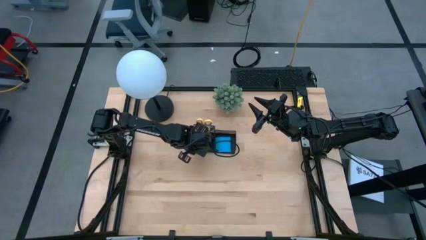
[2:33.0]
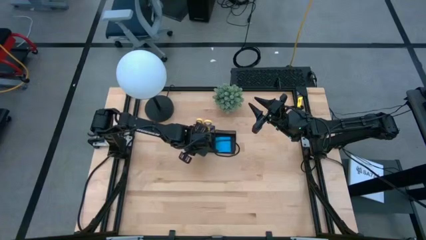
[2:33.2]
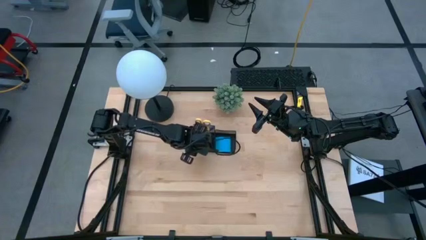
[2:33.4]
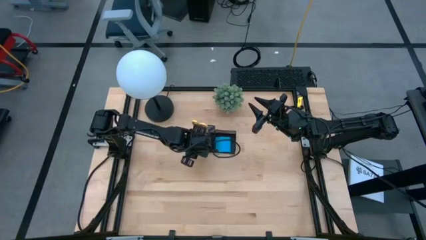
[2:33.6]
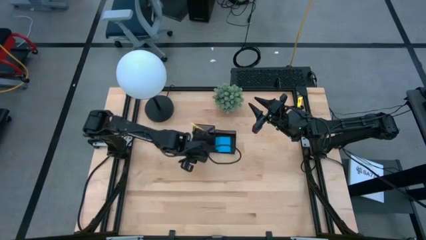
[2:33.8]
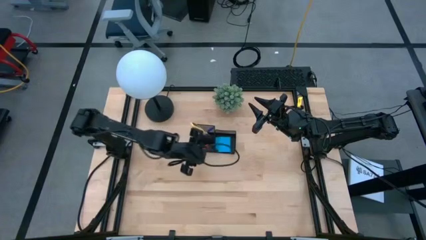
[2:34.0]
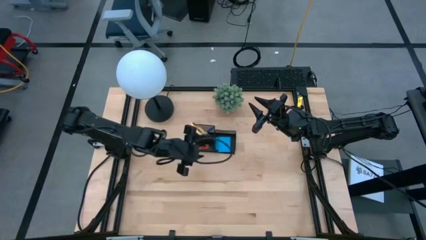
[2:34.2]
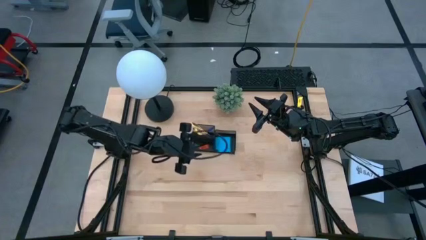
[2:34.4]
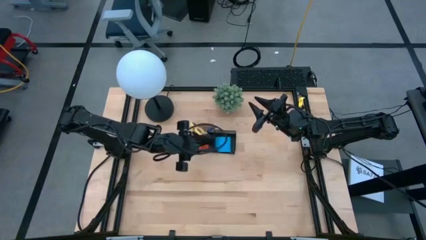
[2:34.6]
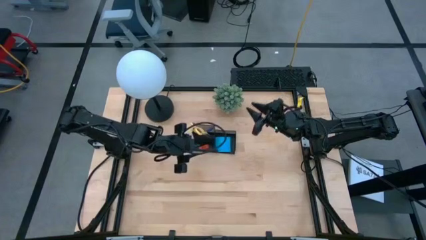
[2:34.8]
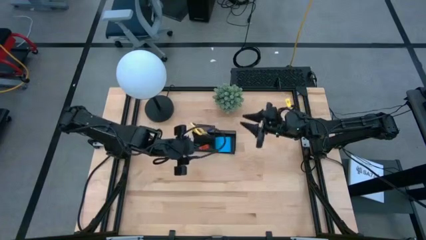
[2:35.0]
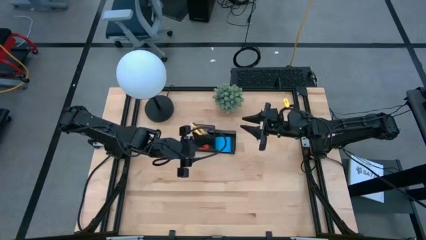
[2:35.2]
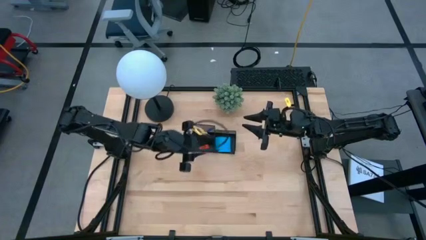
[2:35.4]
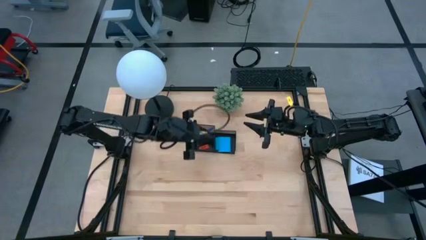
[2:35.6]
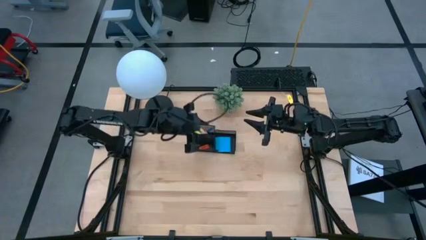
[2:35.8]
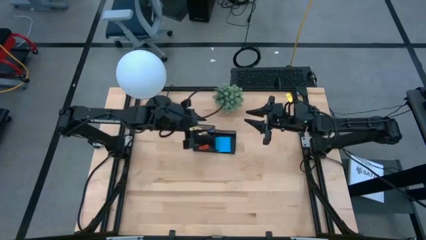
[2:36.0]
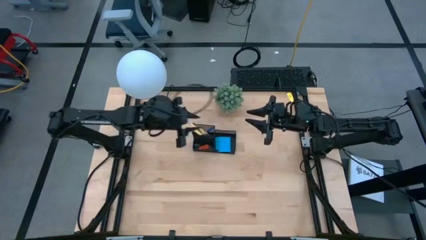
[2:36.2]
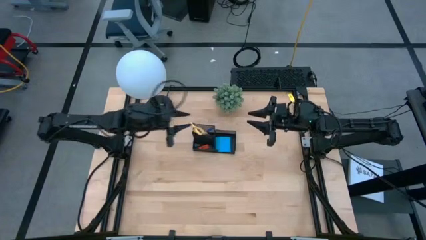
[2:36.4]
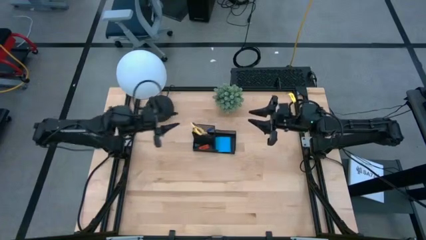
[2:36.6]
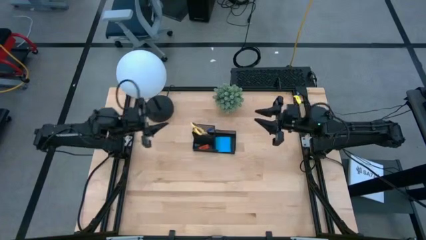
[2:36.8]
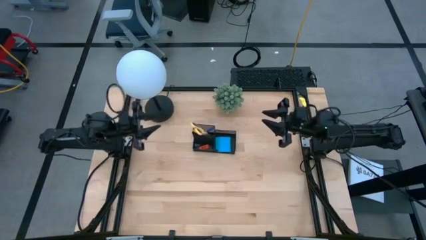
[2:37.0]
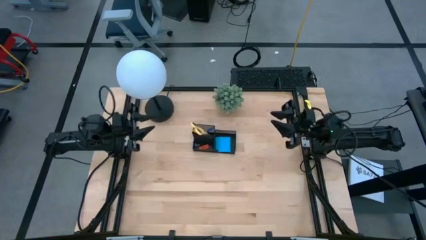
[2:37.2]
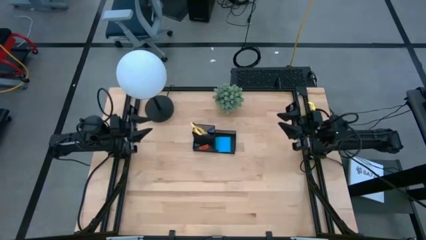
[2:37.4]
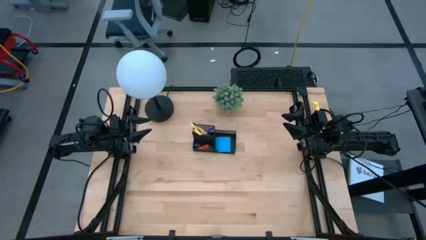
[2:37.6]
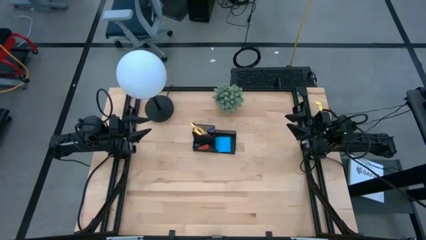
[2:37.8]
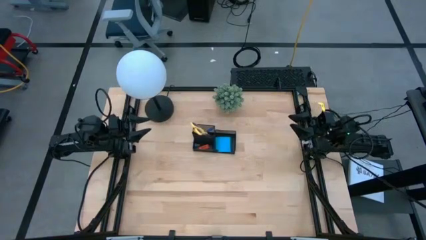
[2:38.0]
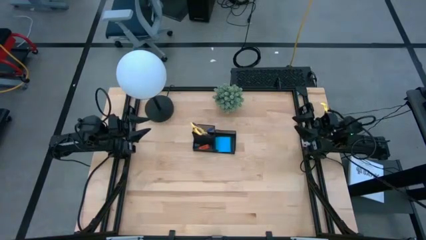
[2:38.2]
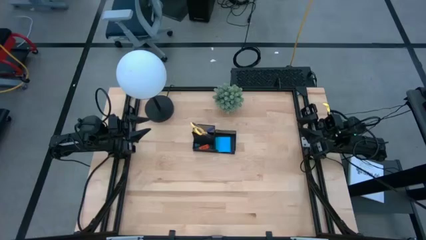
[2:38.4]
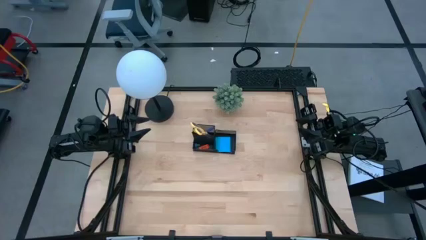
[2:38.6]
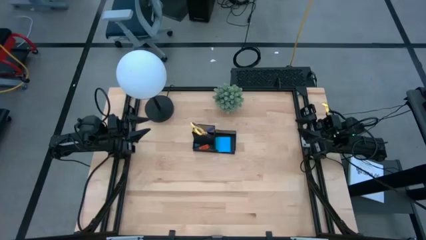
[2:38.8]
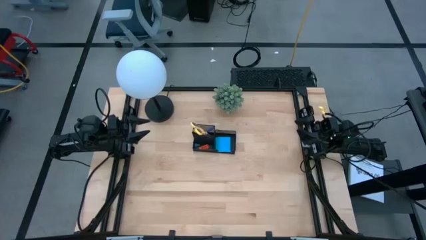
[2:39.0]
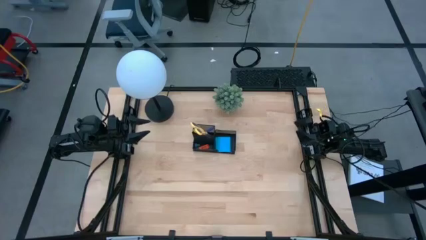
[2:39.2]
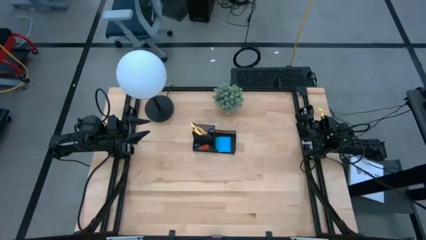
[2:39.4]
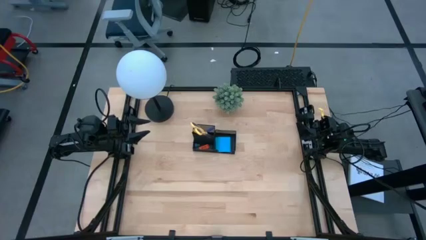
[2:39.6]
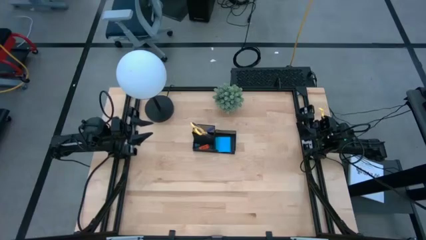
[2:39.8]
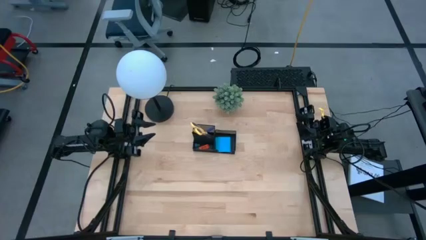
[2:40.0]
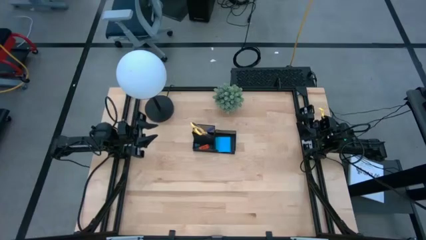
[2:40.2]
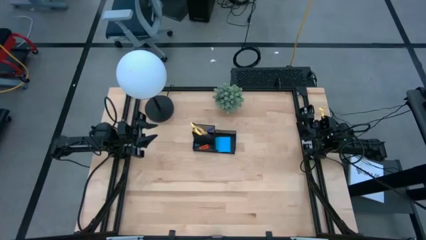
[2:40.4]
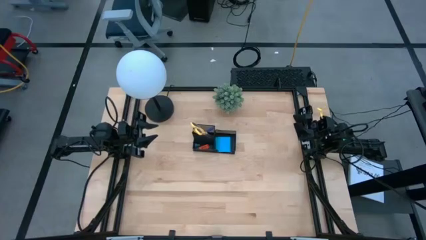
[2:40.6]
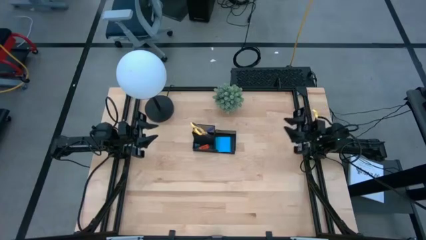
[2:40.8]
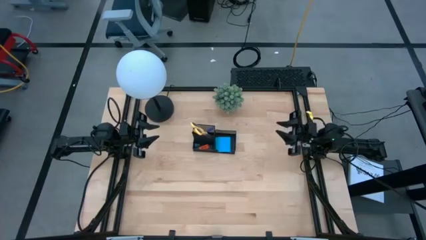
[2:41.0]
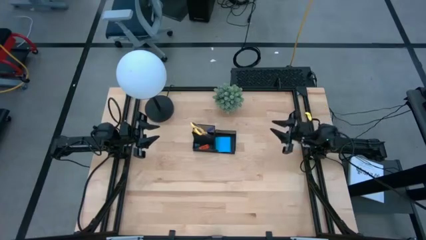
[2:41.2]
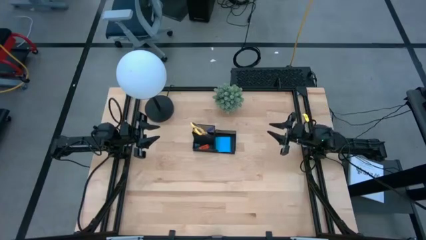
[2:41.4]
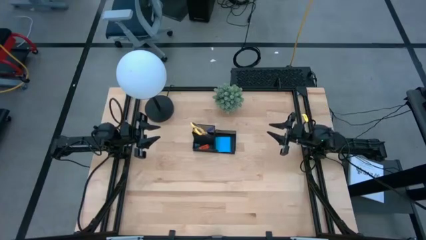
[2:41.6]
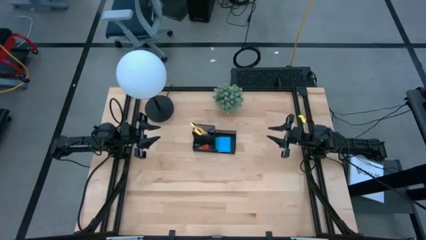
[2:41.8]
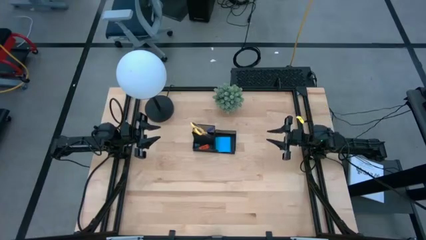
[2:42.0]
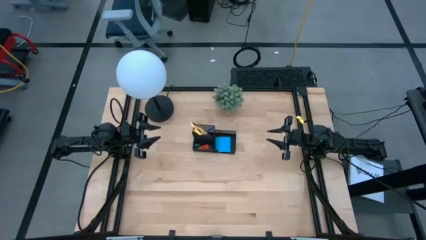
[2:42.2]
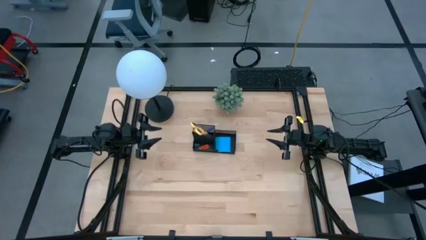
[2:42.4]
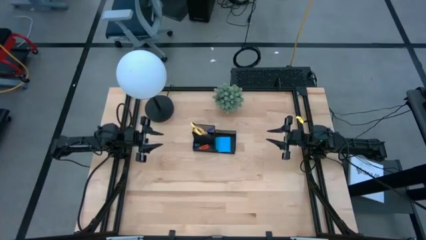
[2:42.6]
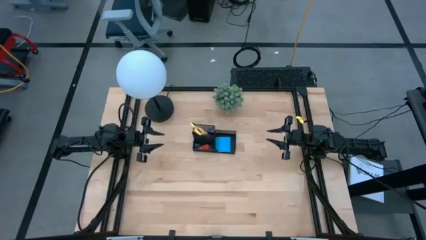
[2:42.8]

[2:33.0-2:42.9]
Task: Pick and place office supplies into organizer
Return to Home Position
